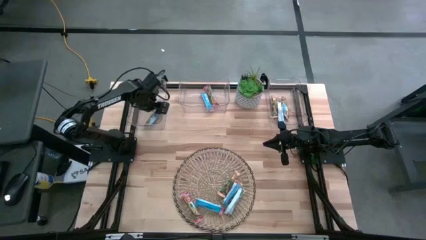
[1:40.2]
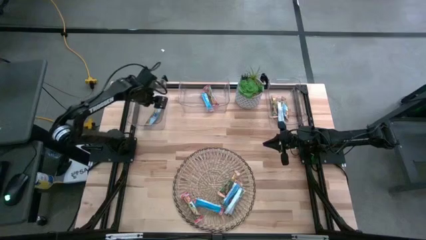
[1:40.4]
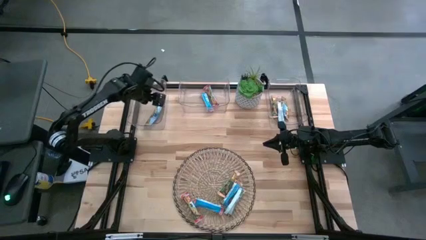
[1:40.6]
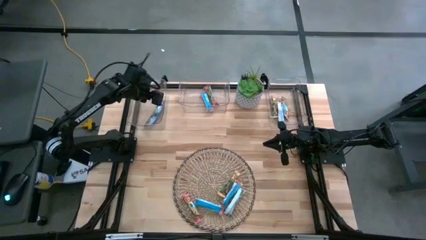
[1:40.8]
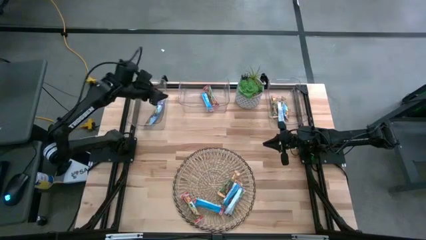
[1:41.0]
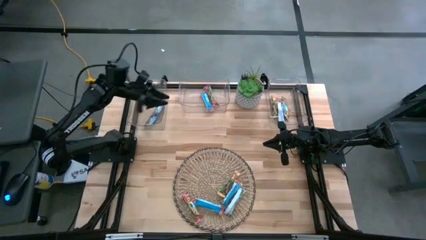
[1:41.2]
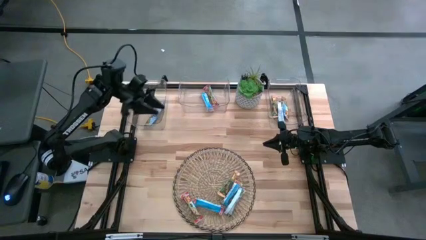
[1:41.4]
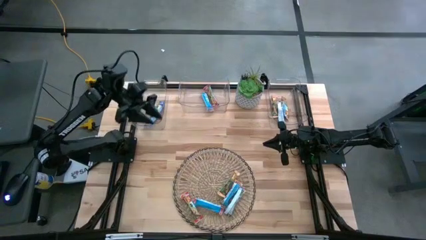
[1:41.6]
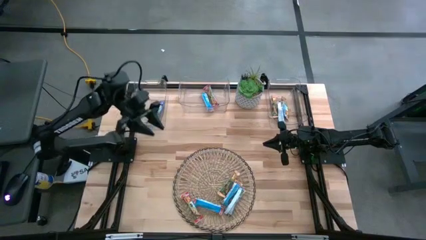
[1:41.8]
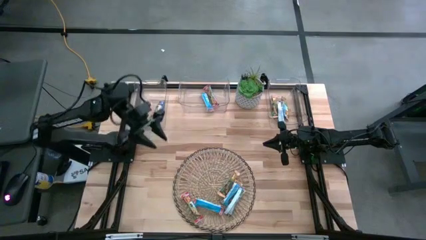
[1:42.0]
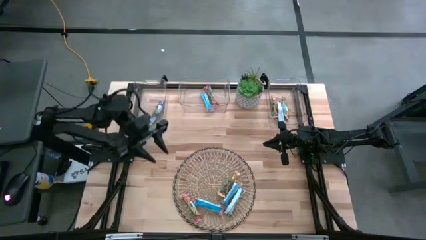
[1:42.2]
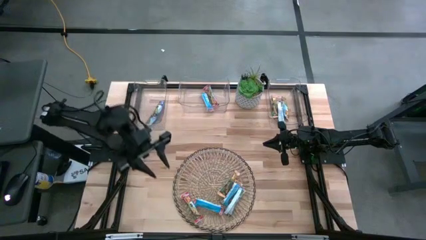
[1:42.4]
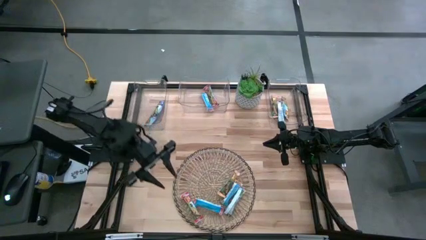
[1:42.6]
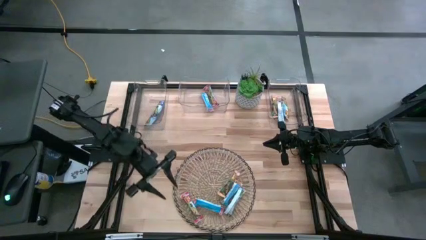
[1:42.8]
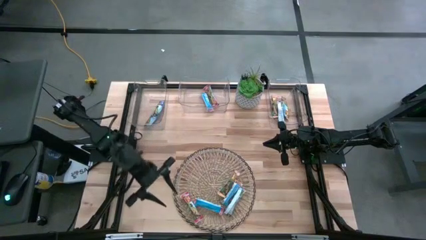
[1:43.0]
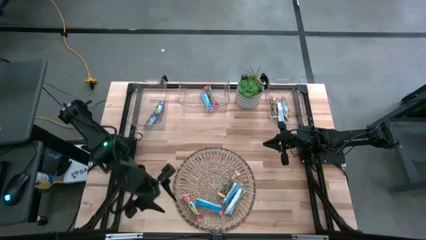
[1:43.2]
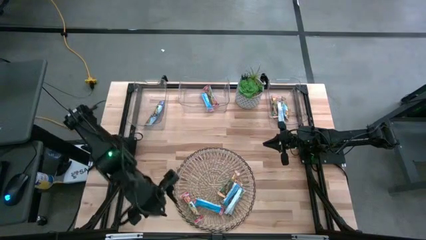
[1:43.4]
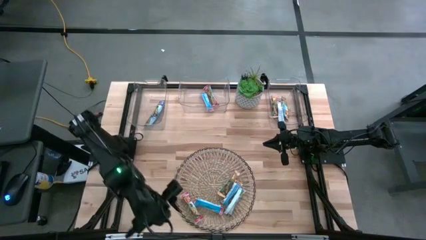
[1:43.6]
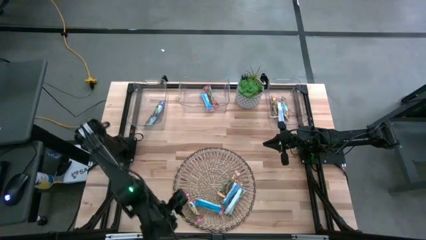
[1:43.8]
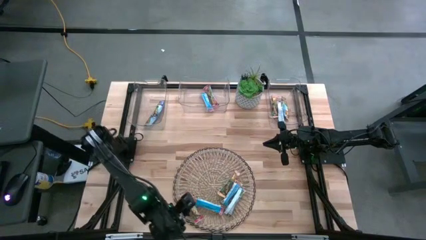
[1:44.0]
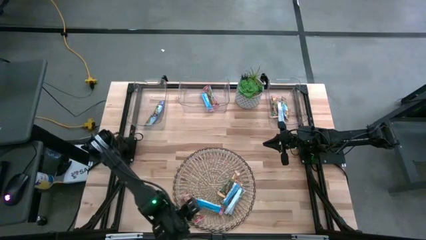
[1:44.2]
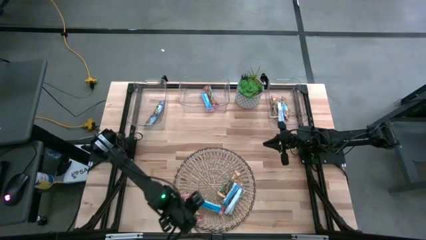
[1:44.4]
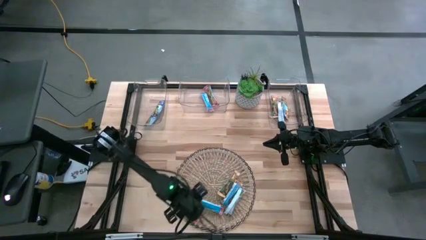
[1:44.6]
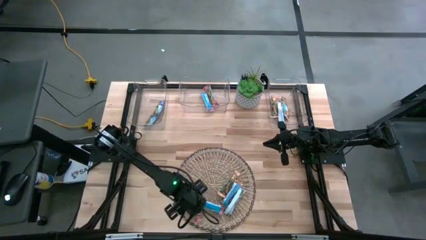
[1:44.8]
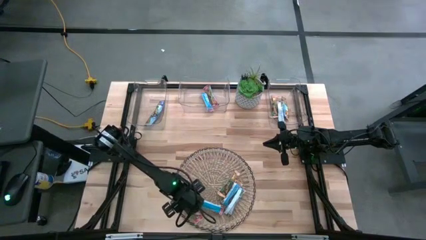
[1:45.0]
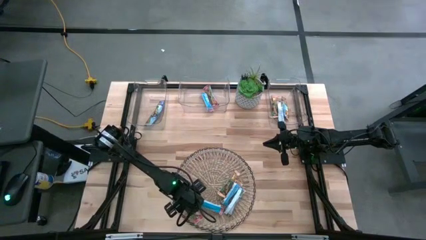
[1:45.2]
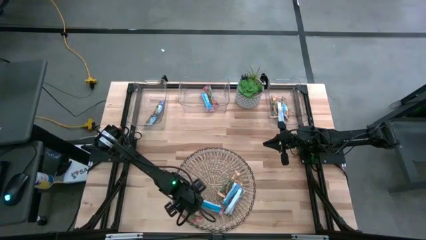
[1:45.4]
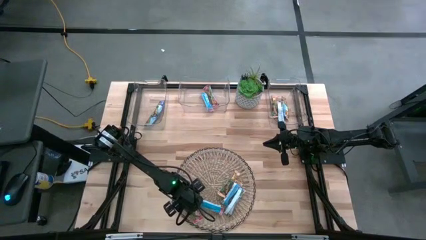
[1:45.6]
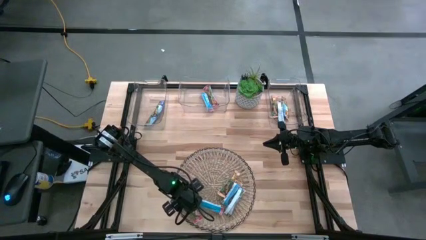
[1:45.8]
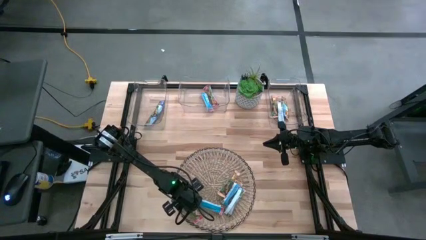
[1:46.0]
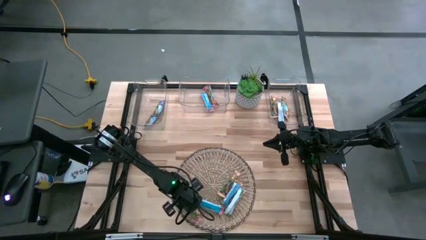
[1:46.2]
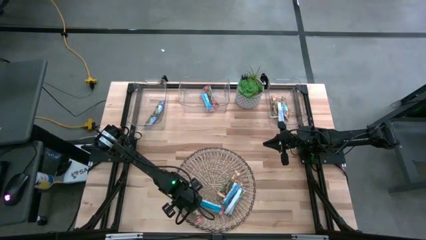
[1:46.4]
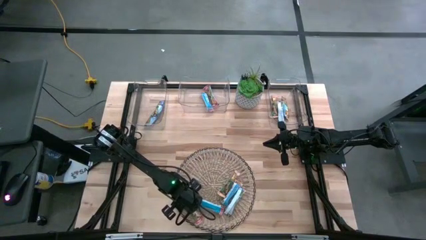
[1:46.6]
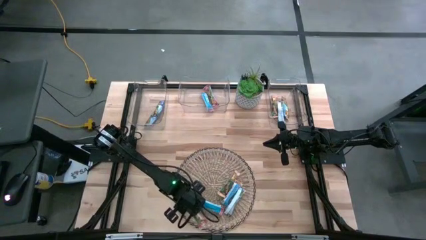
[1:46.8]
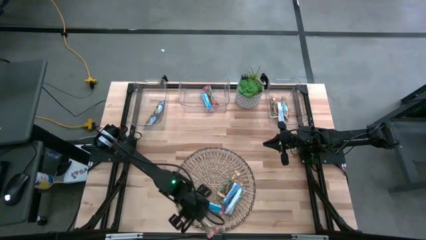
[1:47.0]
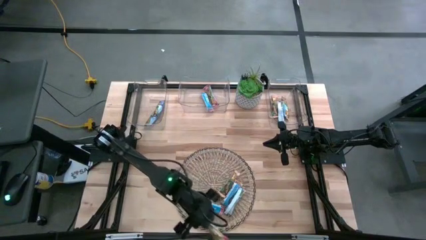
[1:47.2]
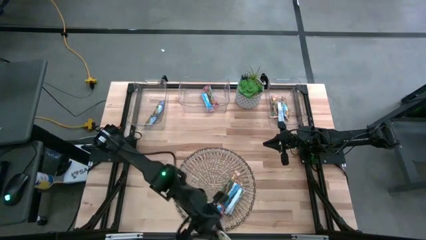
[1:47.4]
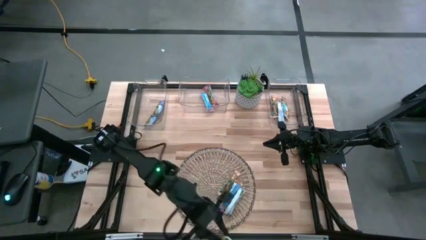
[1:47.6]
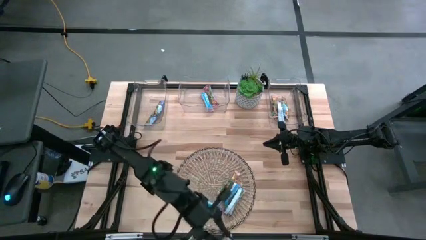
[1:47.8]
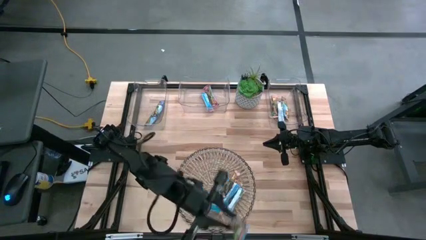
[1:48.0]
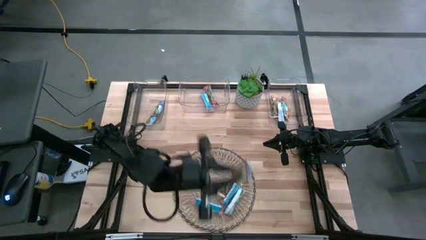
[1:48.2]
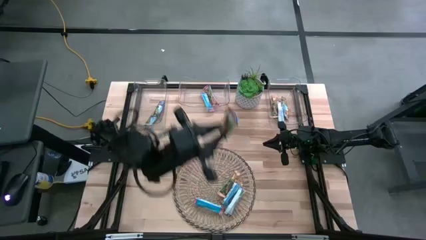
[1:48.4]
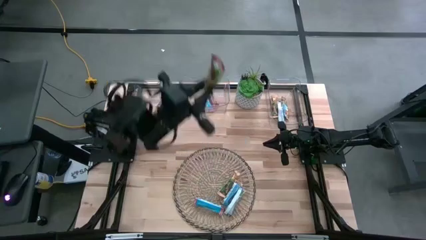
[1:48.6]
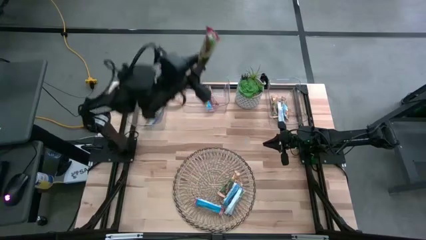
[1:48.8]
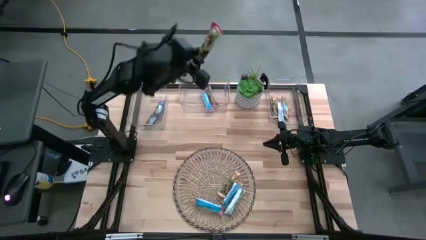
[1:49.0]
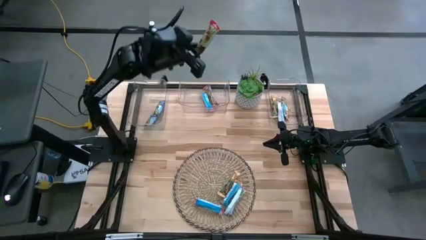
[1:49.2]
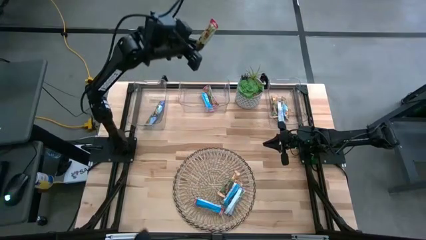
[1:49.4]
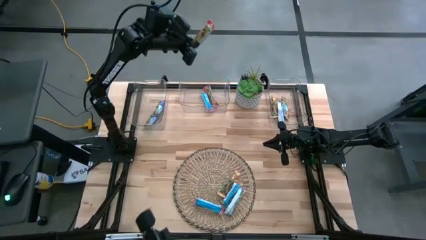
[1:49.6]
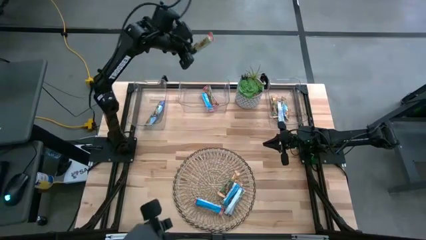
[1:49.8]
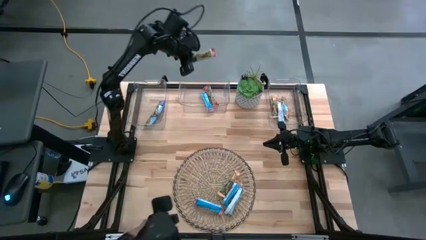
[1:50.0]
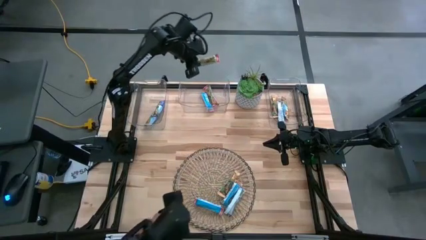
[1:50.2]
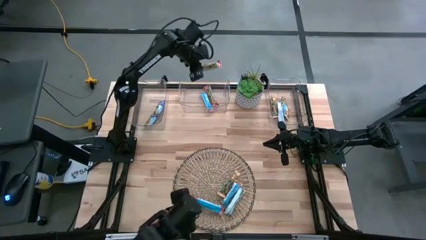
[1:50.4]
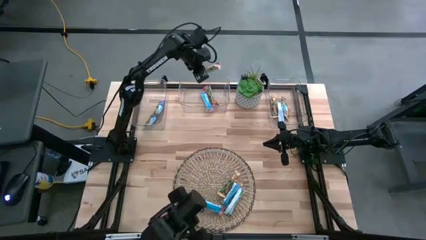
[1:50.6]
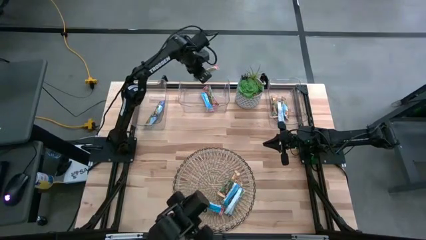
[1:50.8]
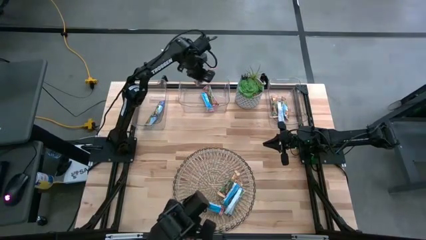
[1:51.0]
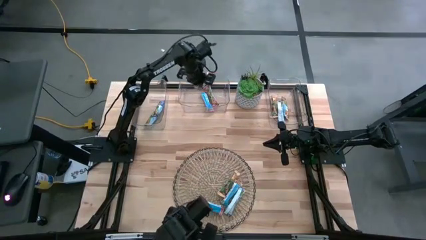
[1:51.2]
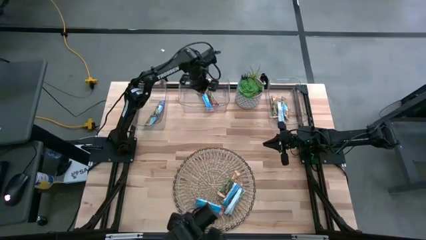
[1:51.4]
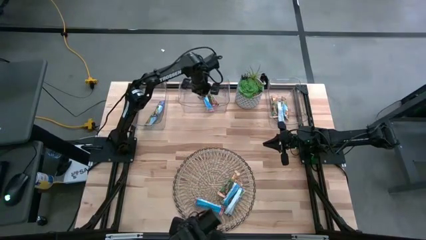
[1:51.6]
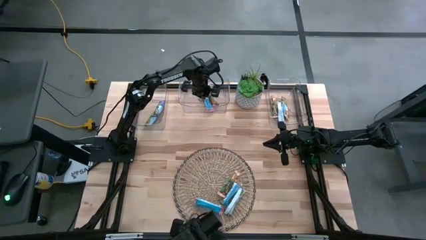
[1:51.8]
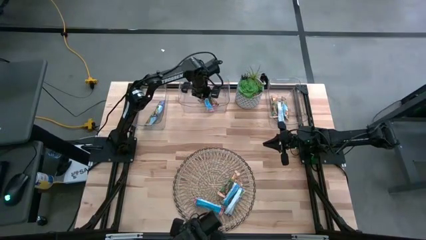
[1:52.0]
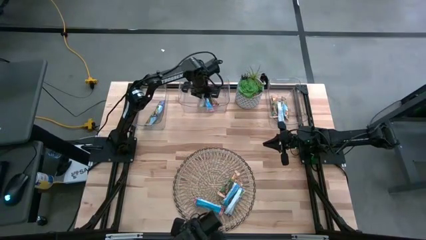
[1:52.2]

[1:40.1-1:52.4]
Task: Pick and place Granola Bars by type
Put the red granola bar into the middle transparent bin
